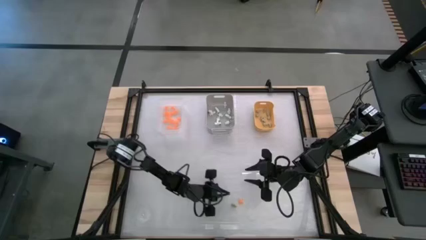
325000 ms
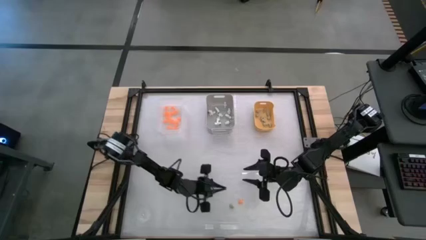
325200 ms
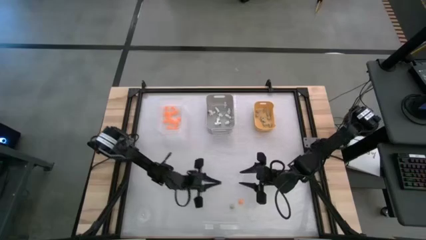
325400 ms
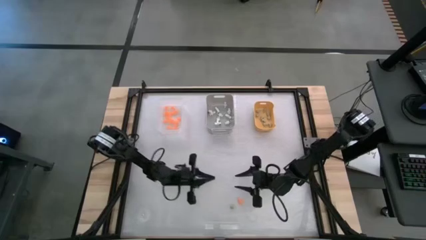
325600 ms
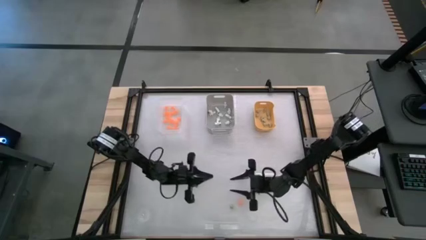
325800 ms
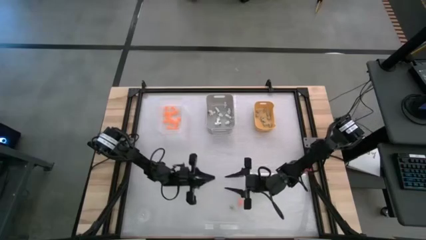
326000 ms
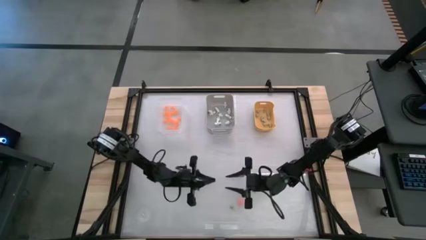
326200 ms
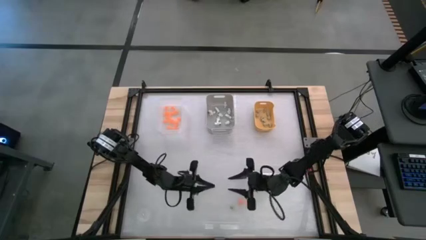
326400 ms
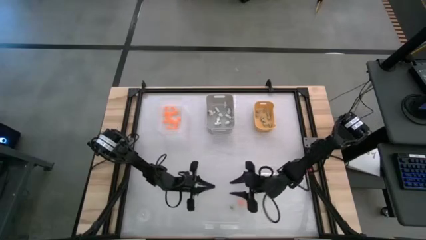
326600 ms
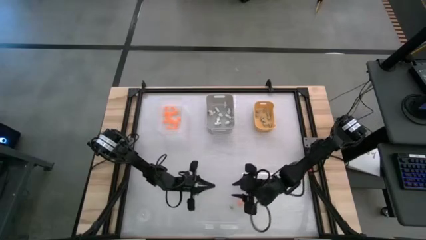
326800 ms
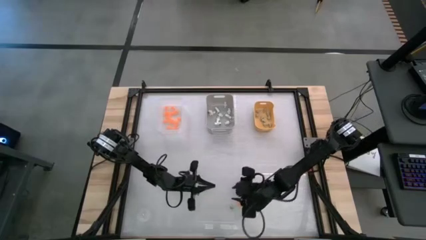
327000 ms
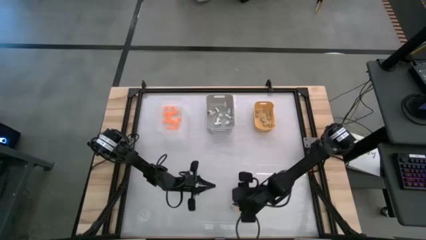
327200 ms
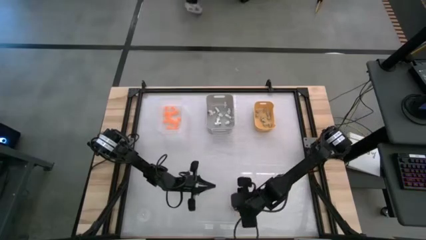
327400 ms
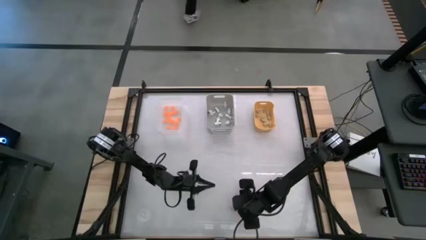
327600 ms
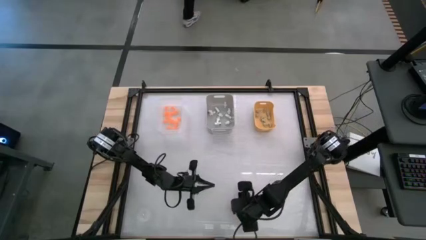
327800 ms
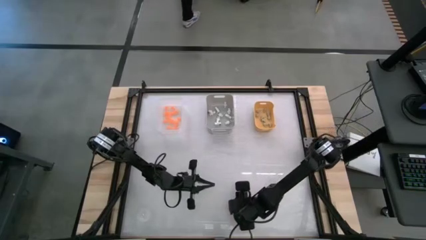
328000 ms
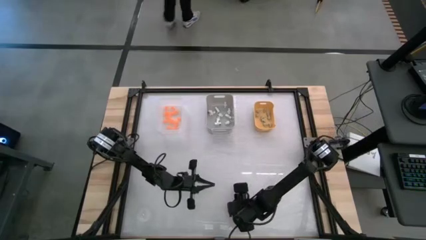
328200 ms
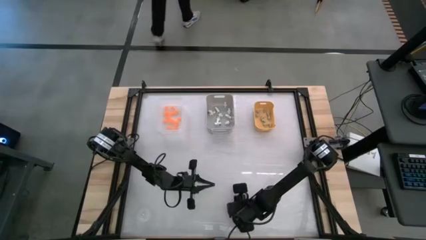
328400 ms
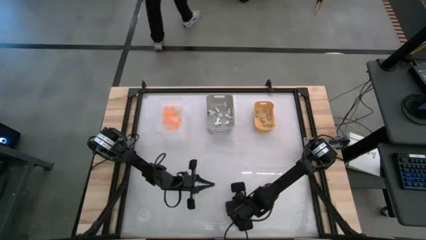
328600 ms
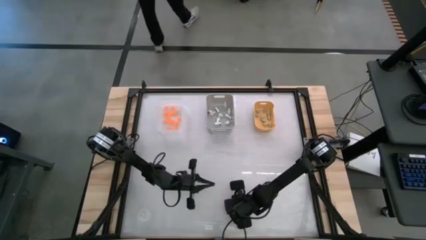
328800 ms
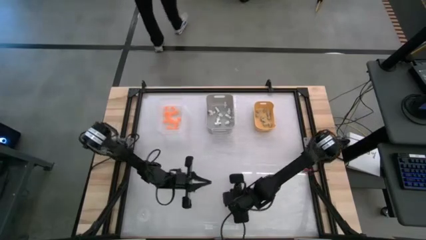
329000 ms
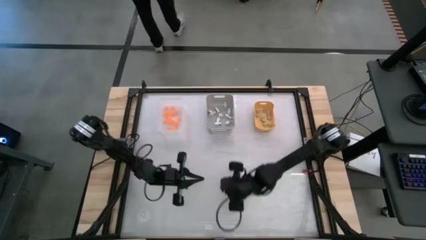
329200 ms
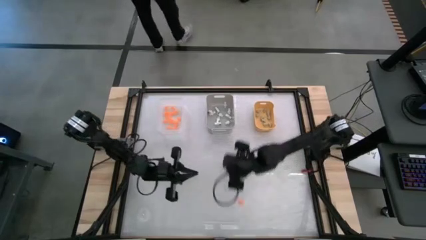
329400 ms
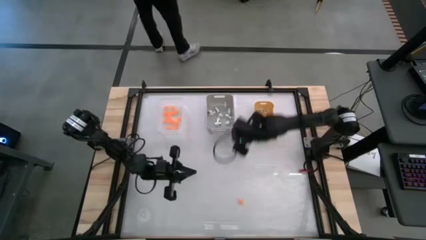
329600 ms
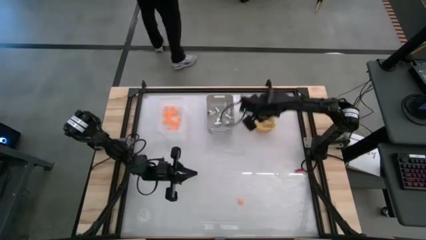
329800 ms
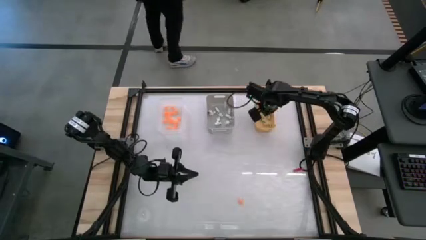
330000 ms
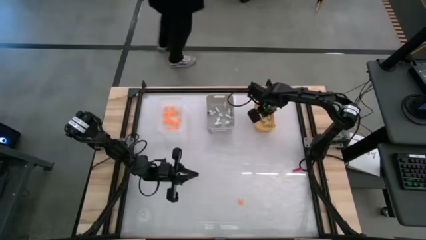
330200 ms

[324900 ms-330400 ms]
Task: Sort Halloween decoration
Put the cream white skull toy into the yellow bin

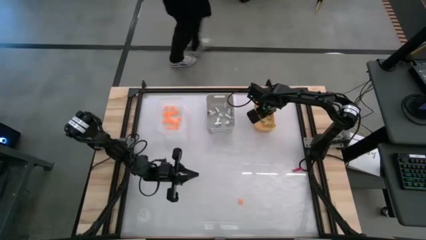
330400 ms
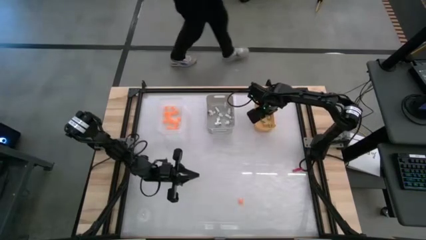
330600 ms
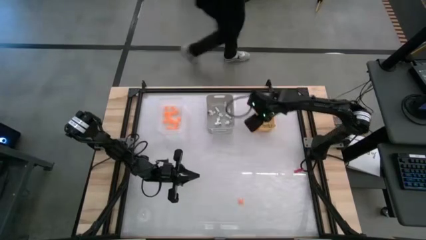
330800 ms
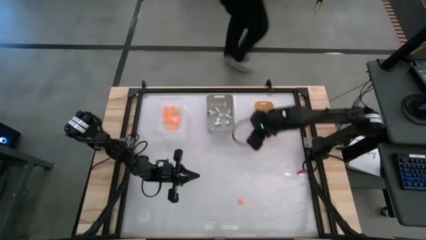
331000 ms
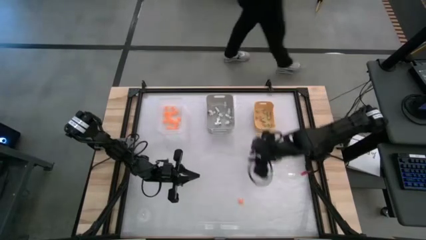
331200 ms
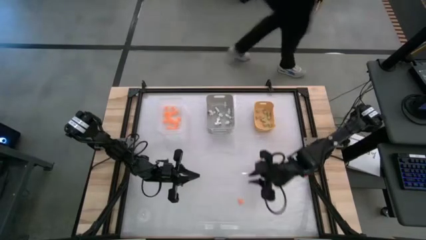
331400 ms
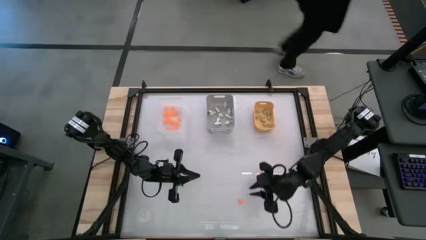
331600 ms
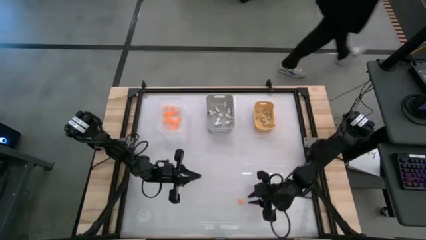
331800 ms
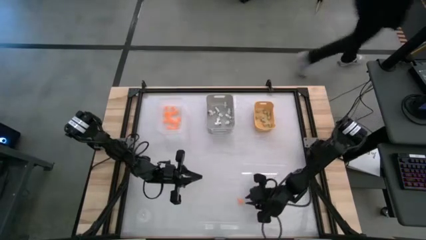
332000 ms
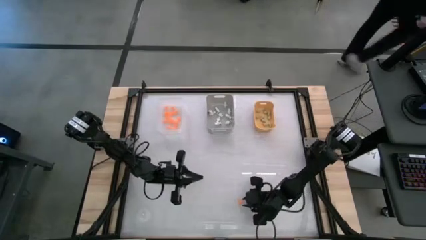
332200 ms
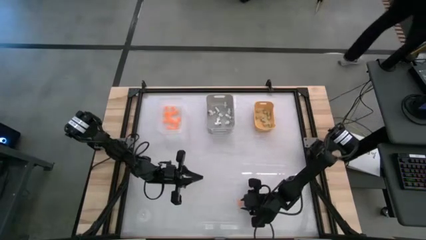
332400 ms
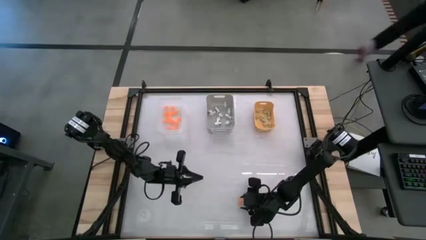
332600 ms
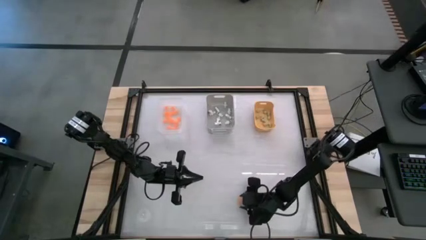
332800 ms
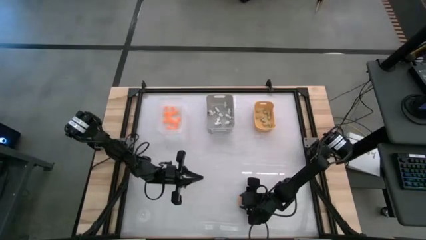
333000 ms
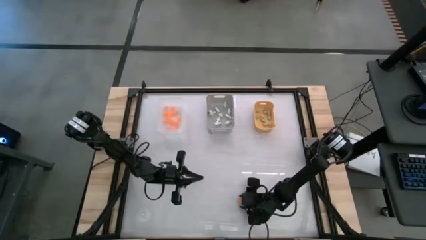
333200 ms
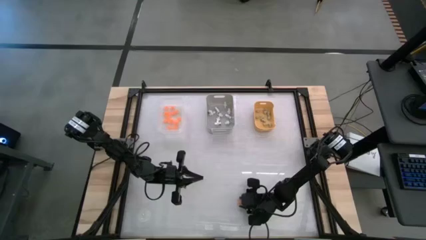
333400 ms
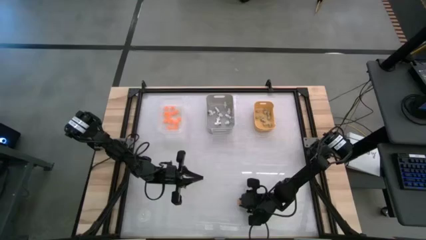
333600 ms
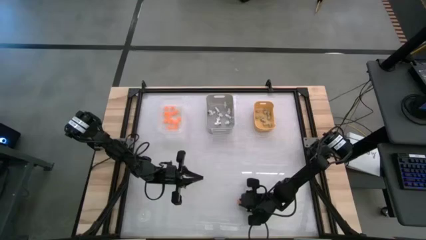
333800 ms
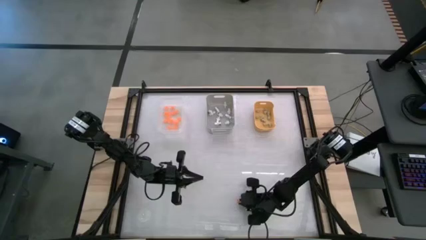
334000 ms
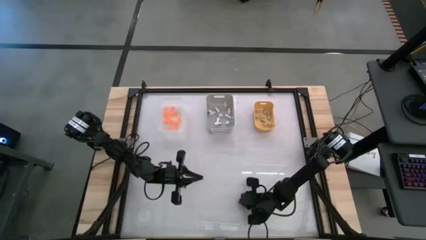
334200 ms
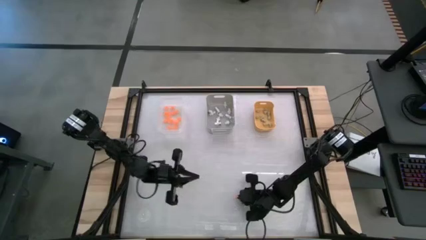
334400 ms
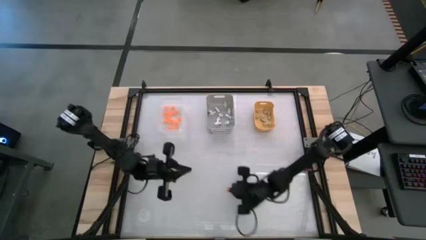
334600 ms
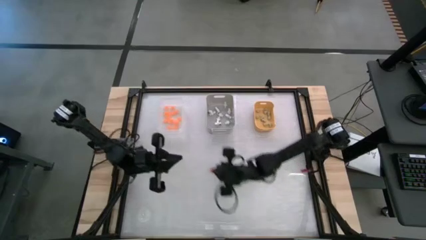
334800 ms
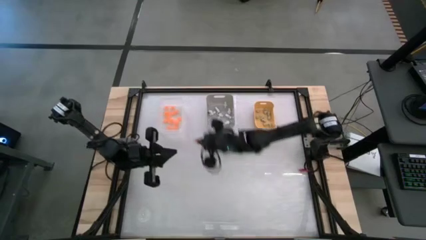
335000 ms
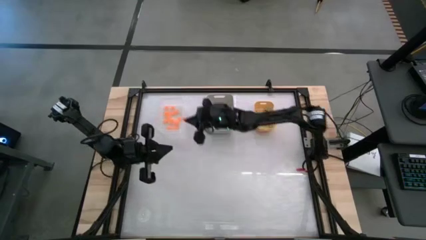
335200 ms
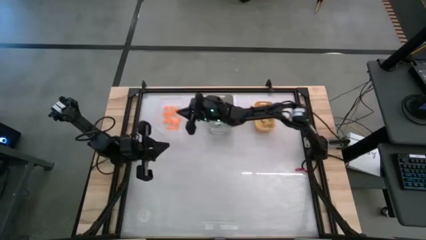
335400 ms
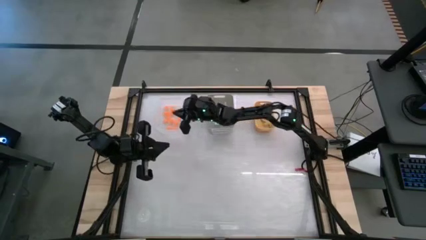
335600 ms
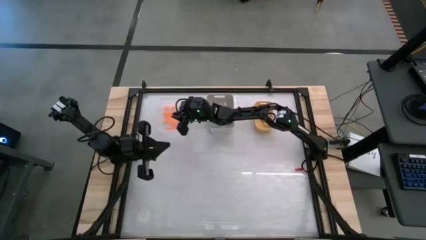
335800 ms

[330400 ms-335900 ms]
Put the orange spider toy into the transparent white bin

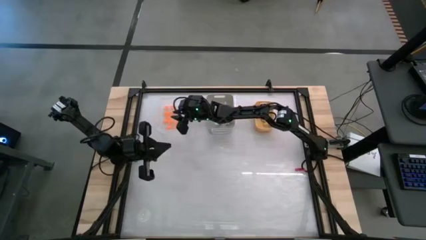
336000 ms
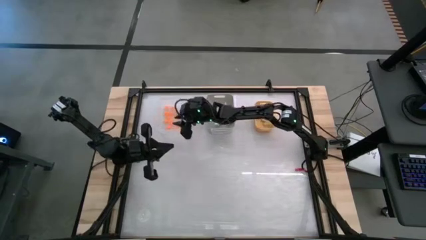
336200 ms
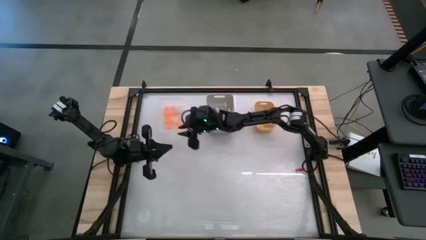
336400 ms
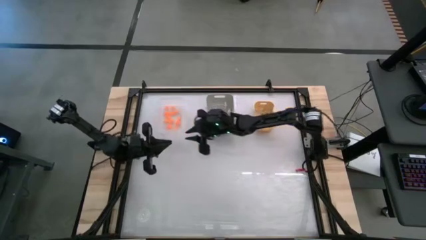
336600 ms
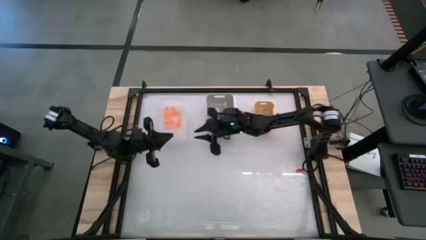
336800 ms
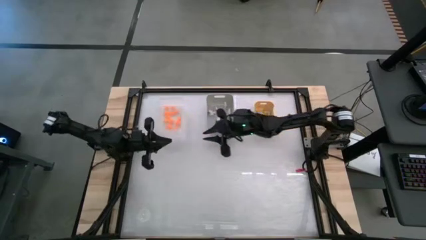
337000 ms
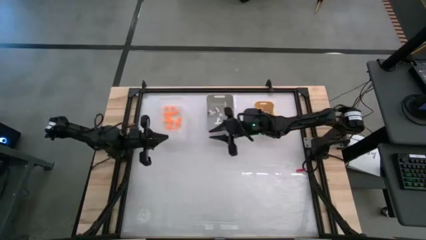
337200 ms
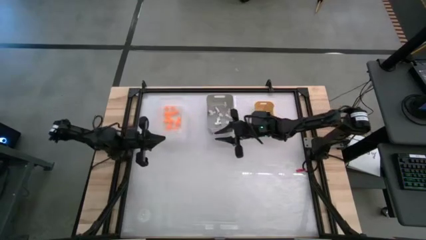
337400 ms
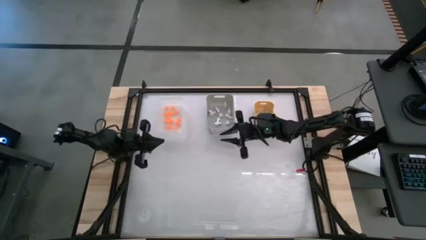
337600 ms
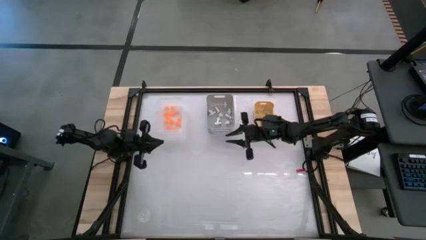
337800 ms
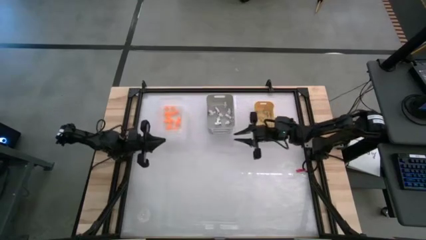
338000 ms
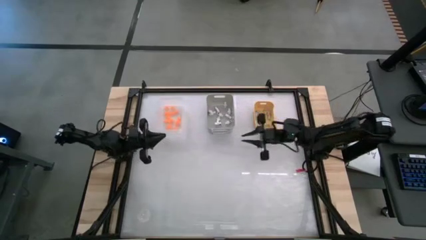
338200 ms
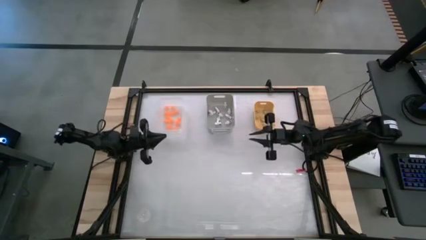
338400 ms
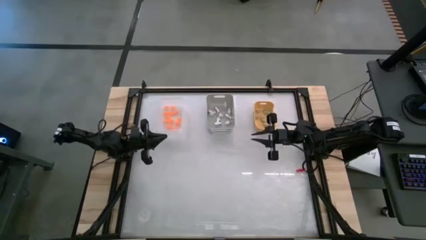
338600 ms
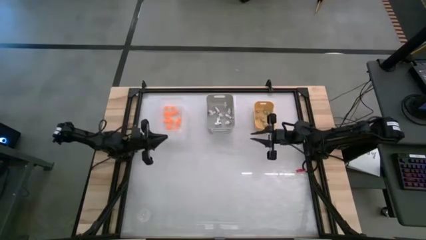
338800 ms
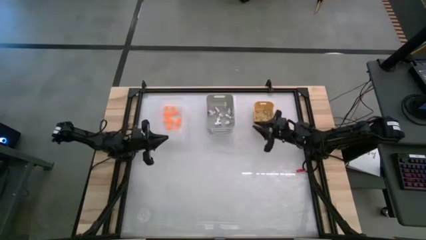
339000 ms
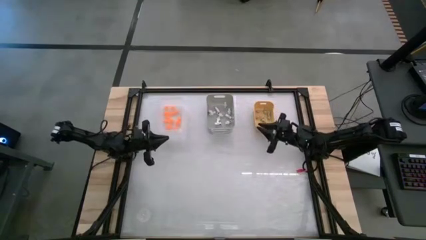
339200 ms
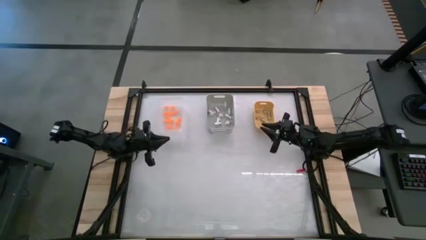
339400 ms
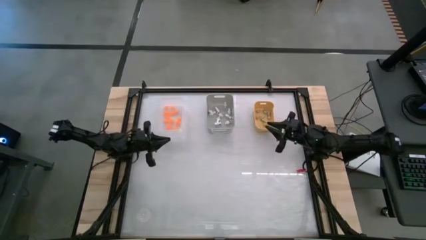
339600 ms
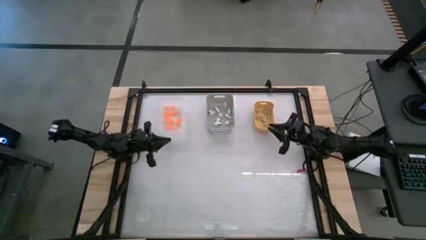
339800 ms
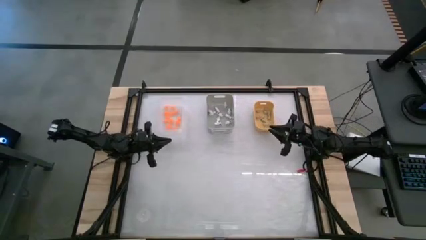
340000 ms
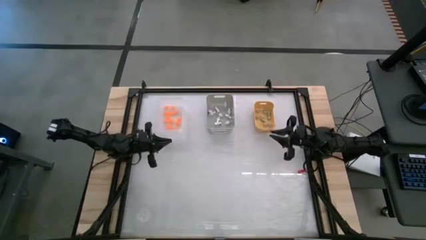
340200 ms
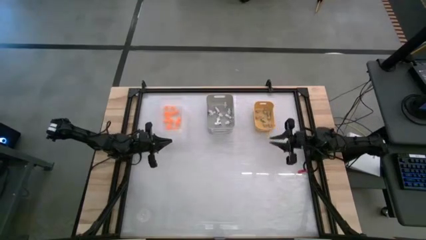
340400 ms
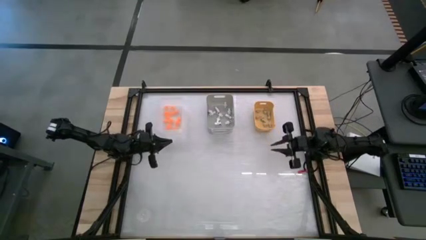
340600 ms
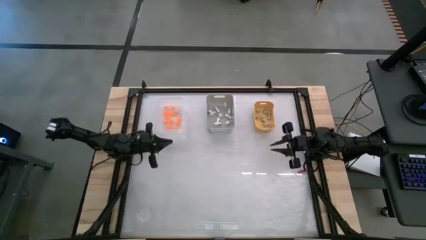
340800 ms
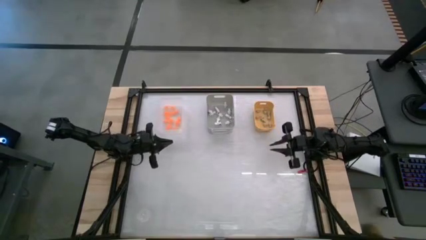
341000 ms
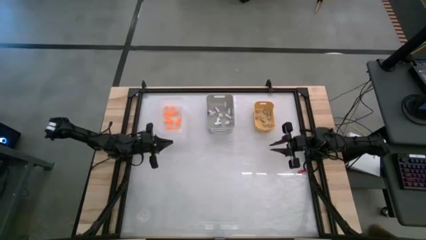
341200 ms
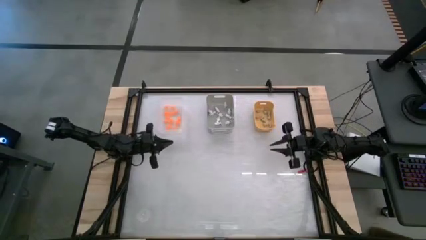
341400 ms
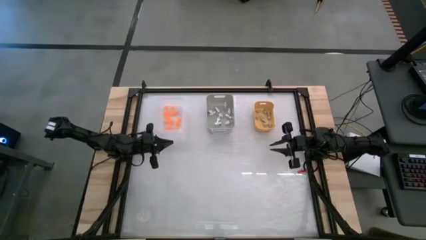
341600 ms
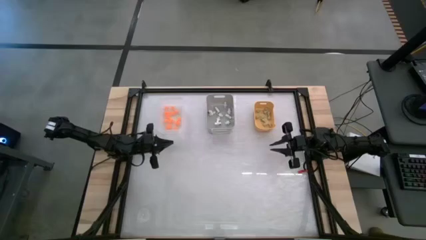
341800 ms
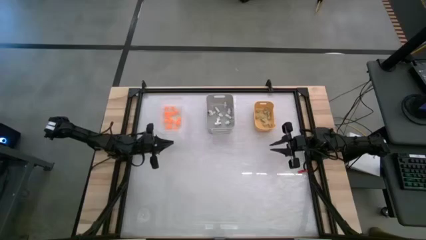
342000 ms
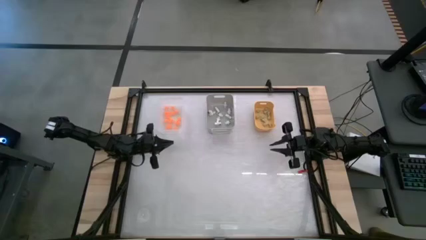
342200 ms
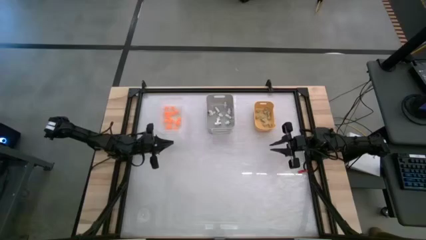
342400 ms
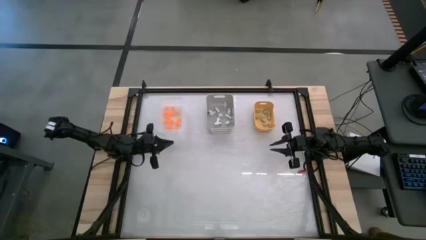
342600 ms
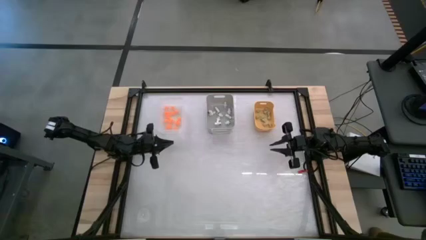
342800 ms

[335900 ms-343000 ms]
Return to Home Position
